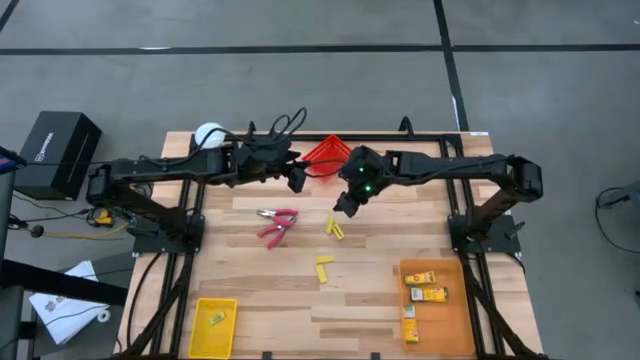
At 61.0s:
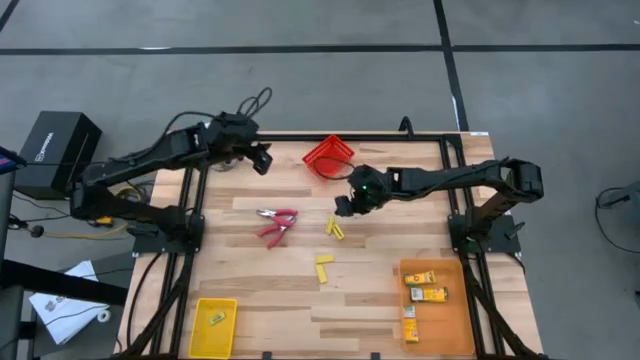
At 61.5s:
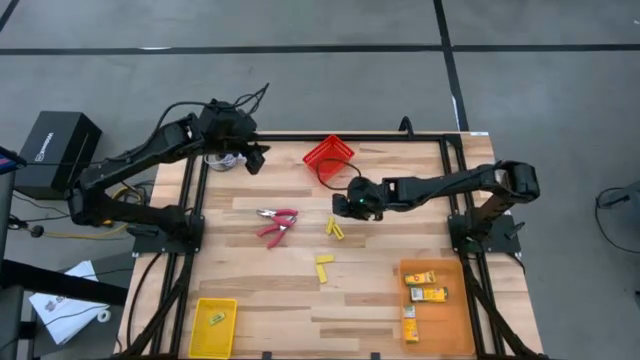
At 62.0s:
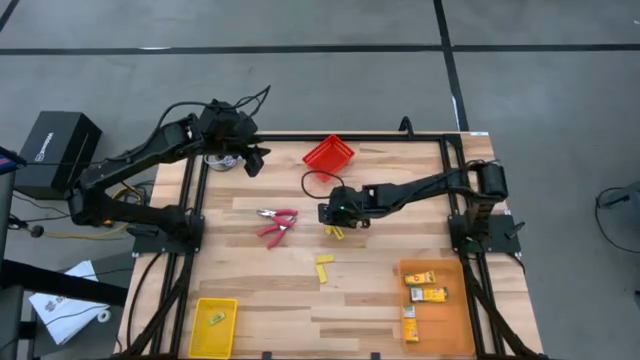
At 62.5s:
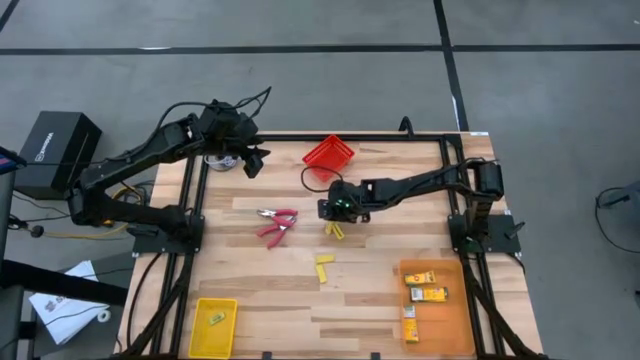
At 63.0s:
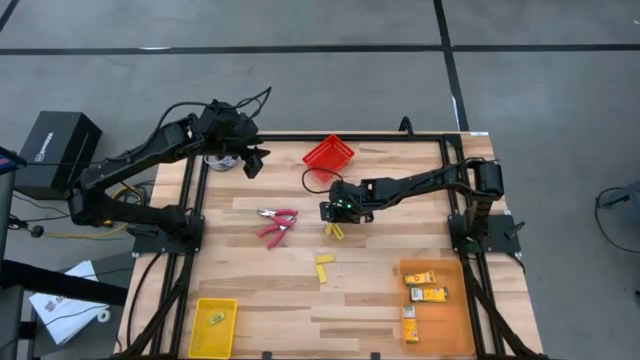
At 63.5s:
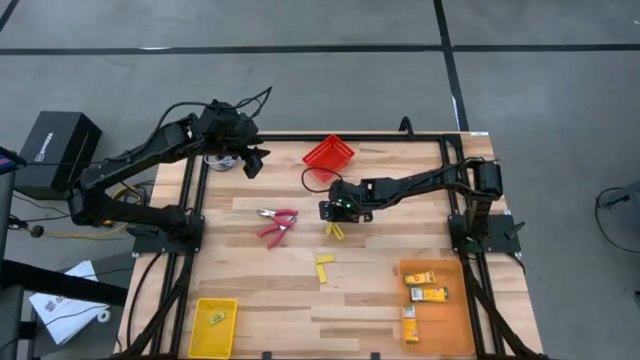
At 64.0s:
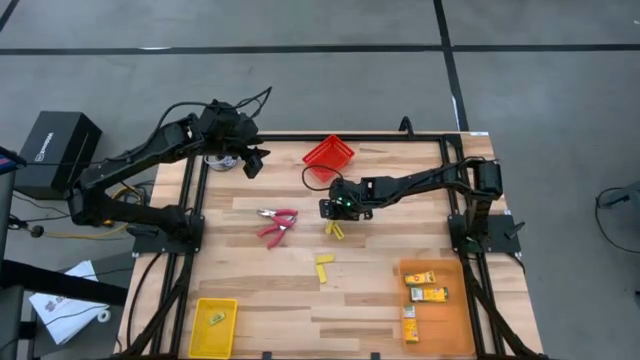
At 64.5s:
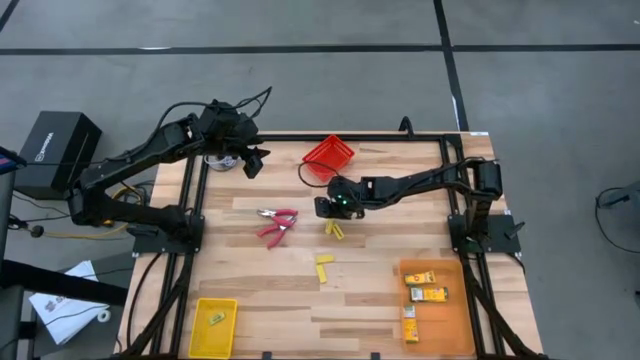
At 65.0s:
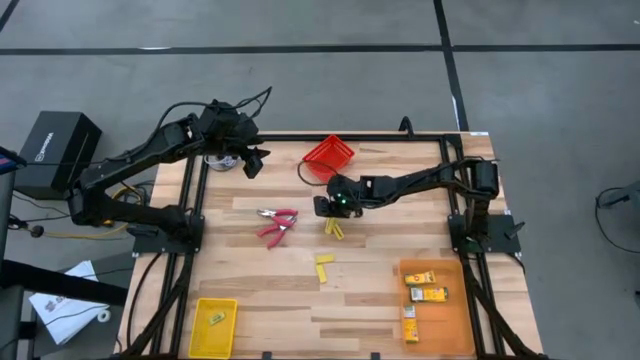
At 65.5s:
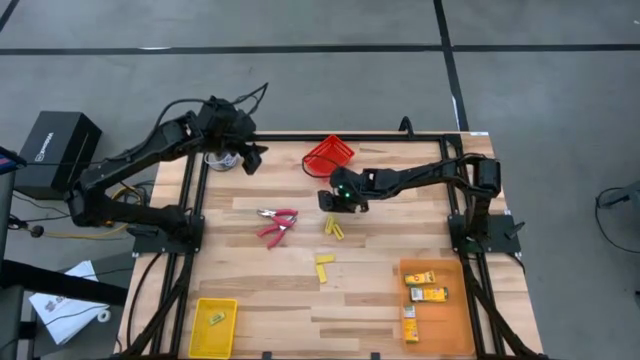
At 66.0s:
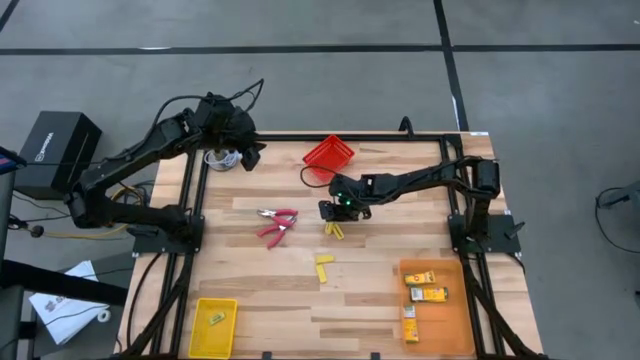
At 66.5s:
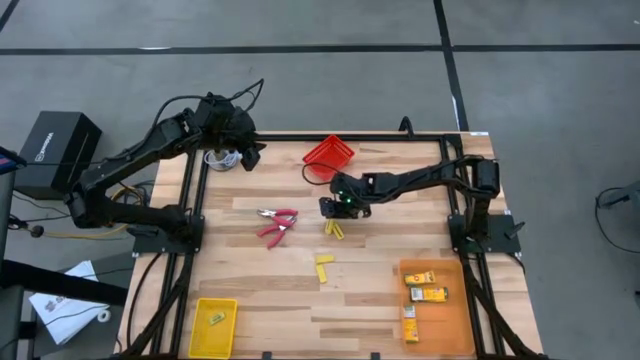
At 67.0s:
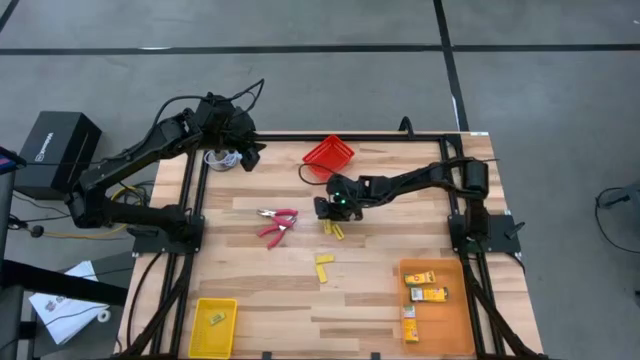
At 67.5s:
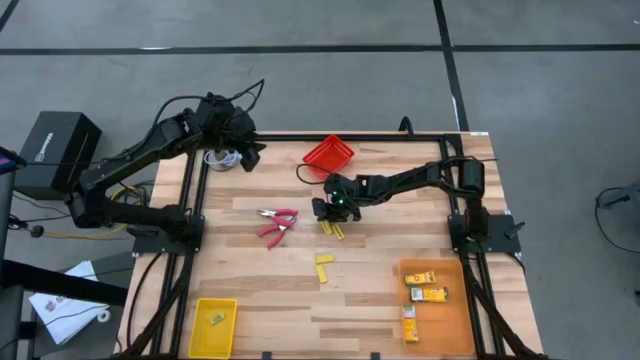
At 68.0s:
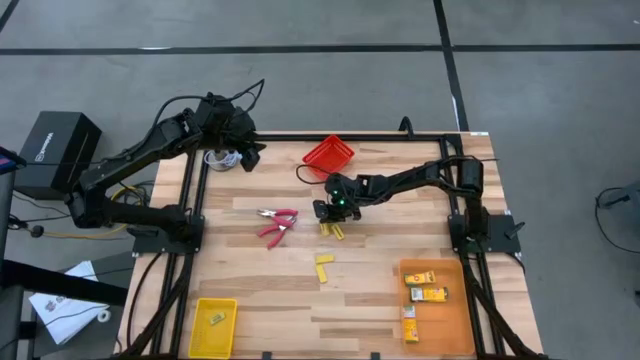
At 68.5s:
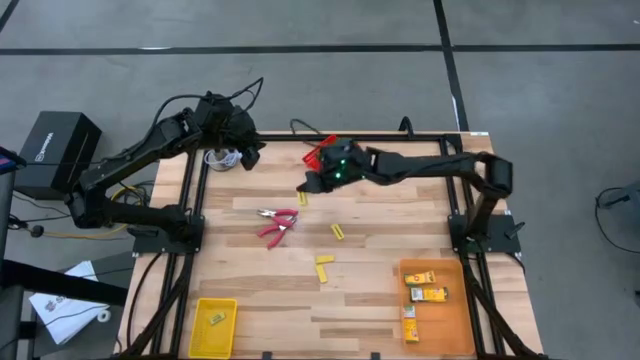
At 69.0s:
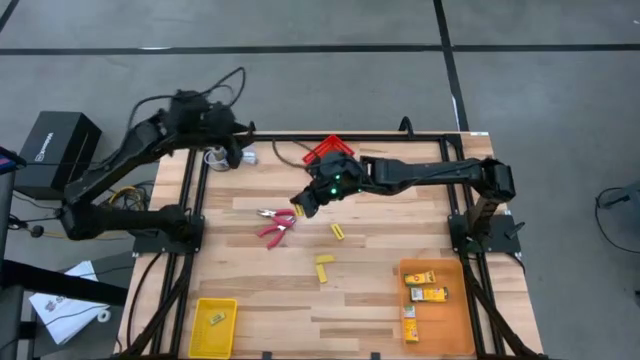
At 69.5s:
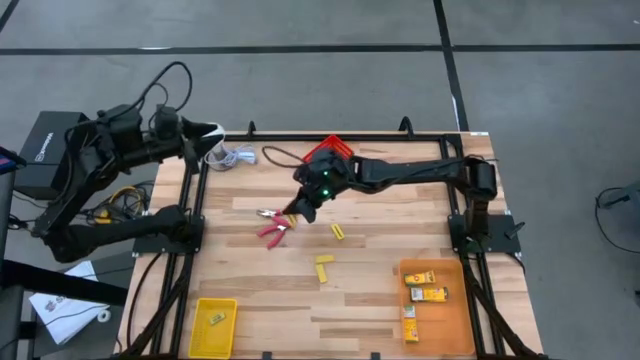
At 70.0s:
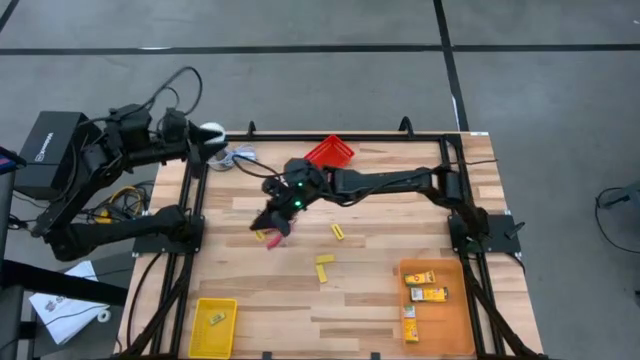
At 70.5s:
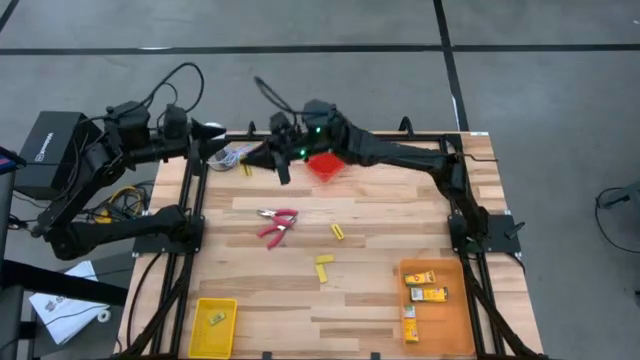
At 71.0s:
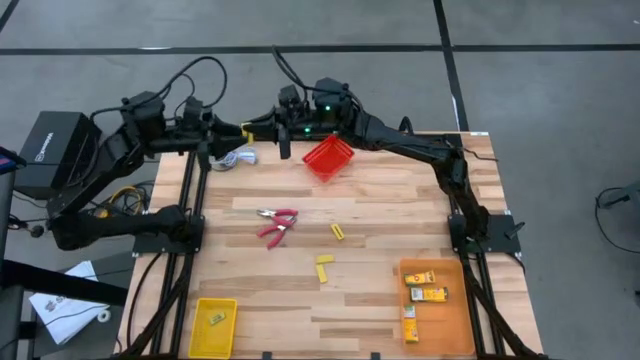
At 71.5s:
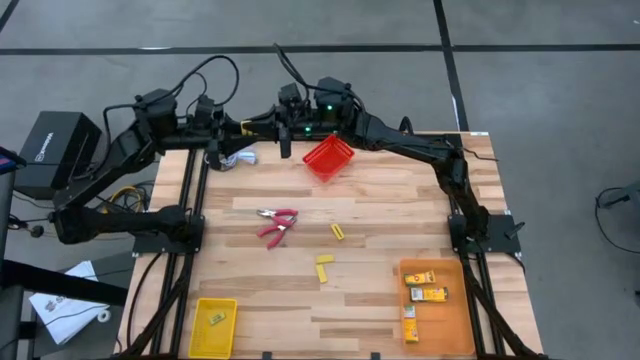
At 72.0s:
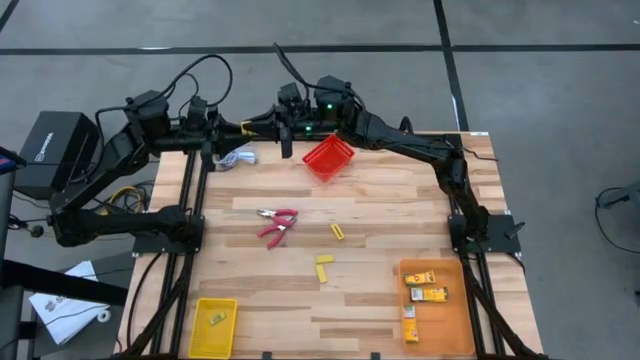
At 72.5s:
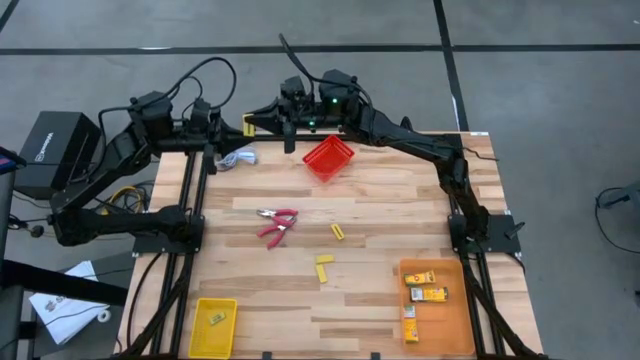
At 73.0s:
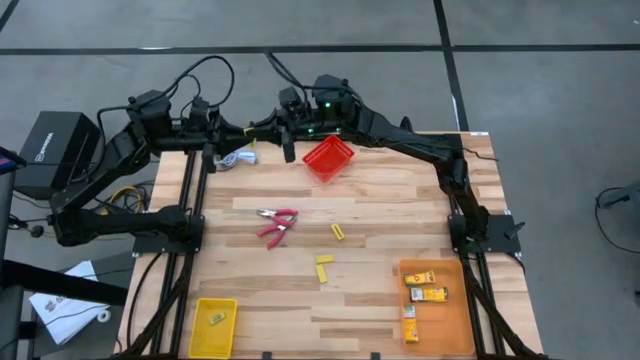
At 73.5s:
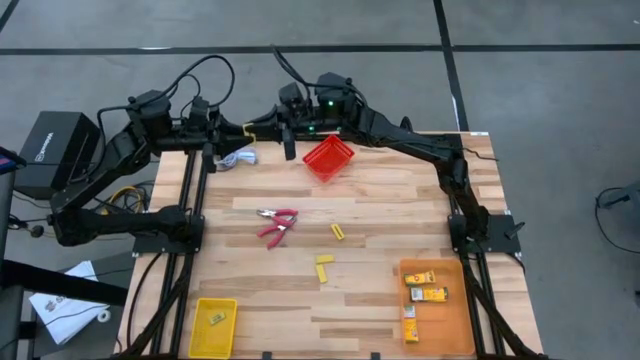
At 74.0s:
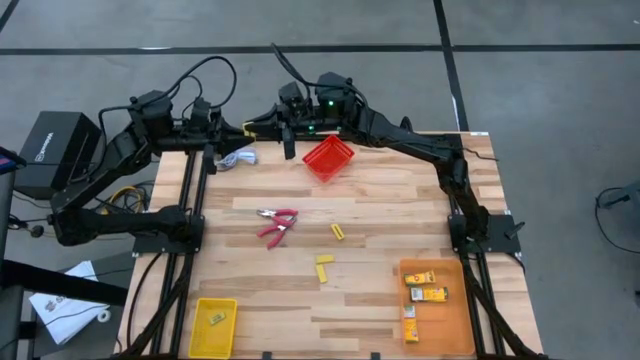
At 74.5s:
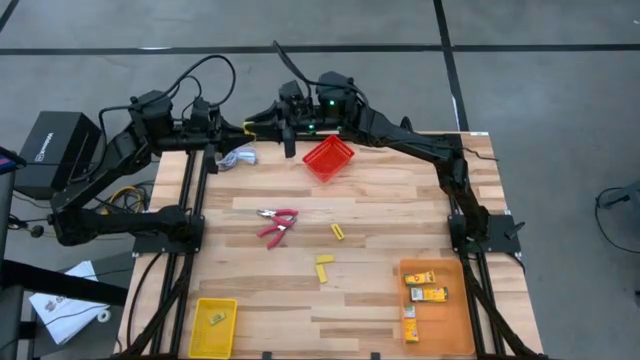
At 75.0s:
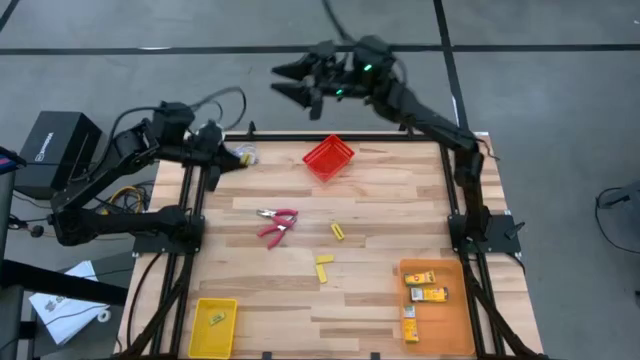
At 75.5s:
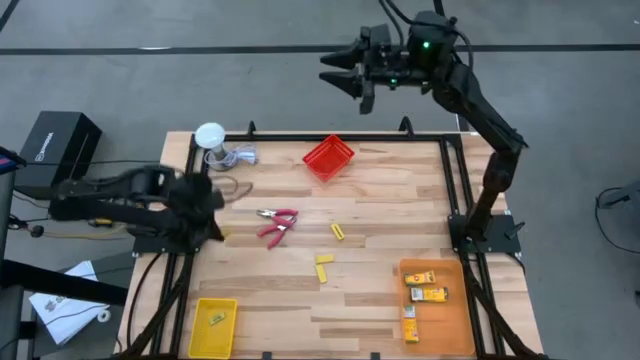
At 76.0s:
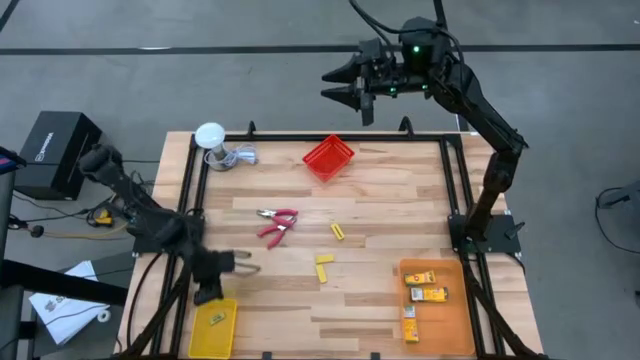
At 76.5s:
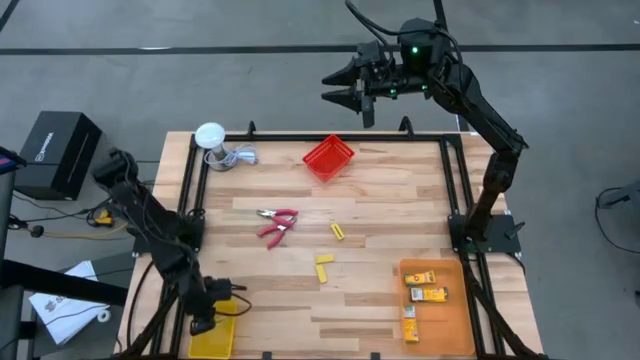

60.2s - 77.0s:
Task: Pick & Place School Supplies
Put the yellow eraser into the yellow bin

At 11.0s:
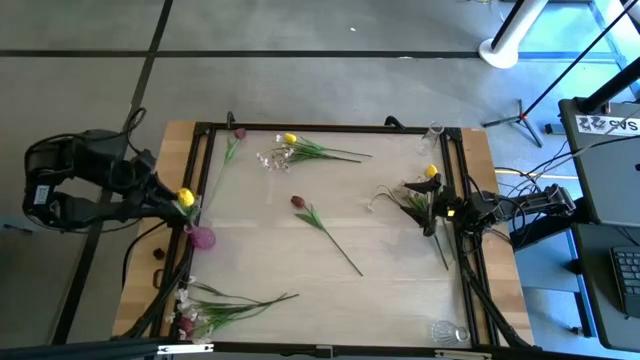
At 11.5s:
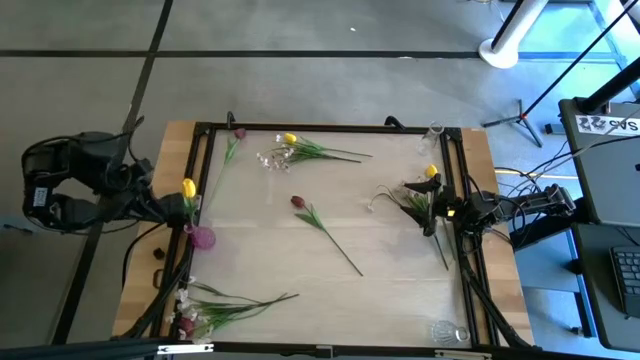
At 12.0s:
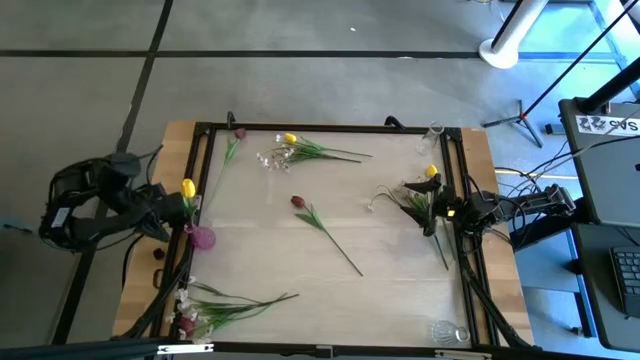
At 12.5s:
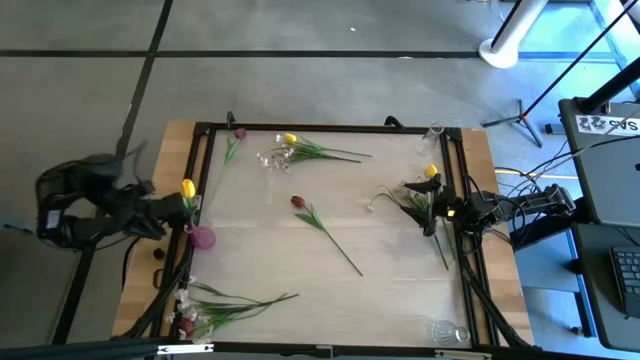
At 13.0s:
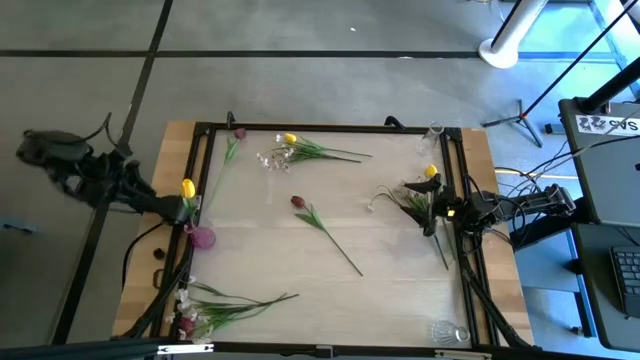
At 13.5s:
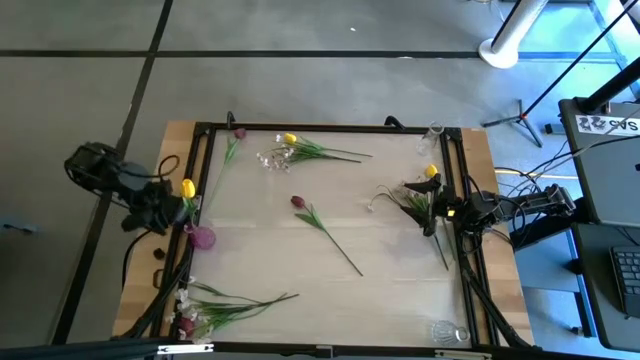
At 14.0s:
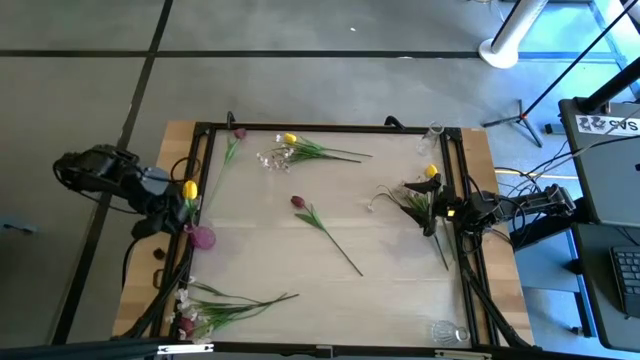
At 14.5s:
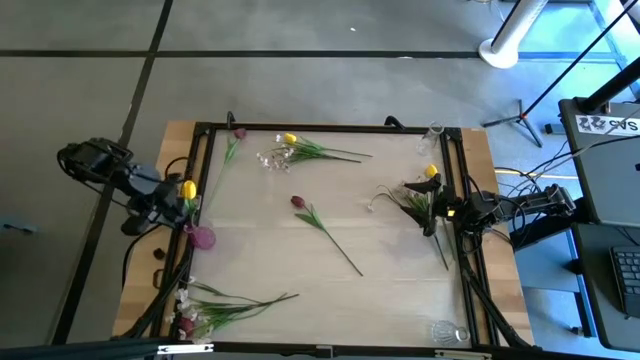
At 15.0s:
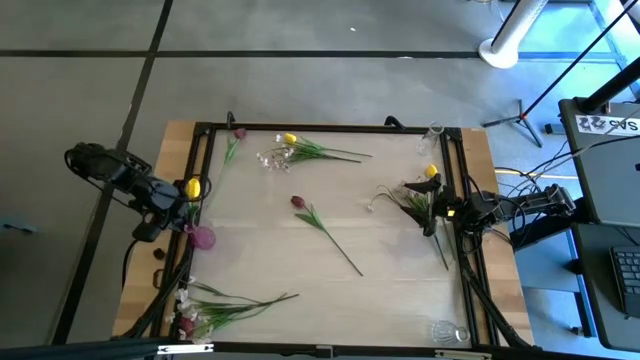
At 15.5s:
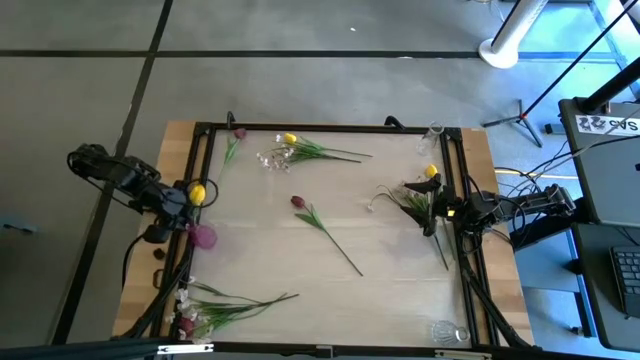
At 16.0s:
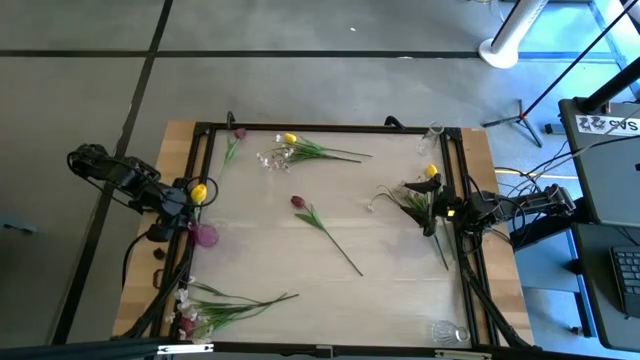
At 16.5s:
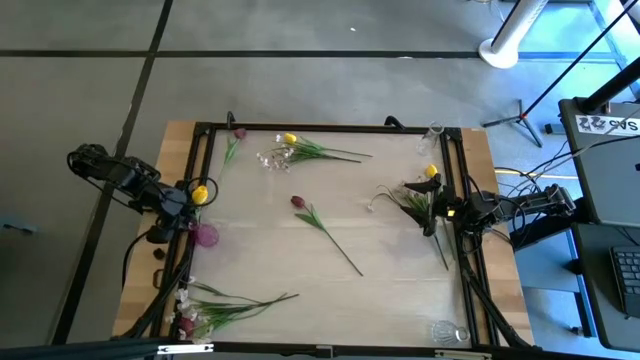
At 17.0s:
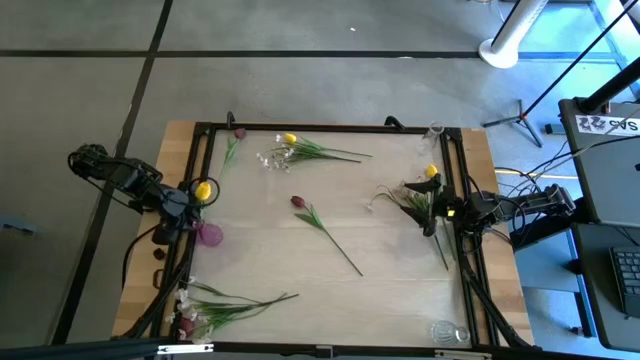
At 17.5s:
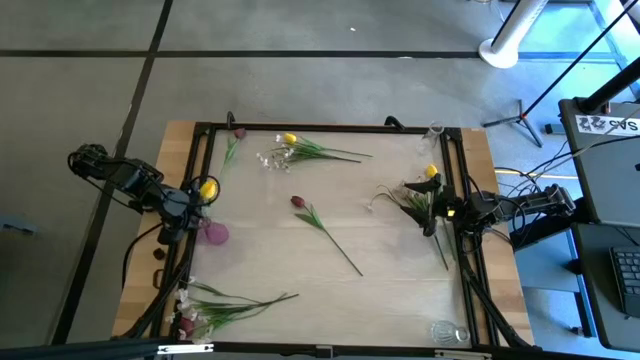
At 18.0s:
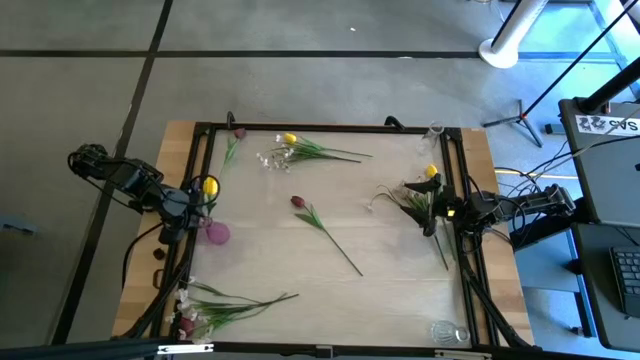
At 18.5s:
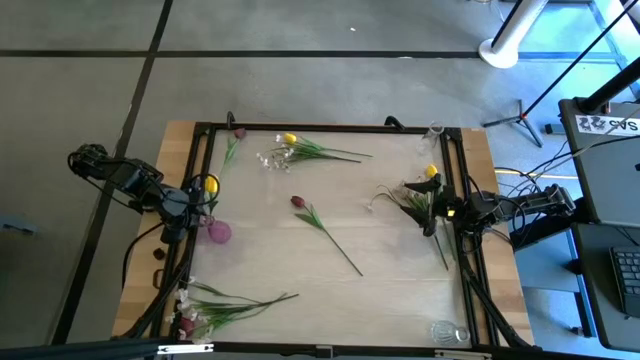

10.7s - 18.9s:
Task: Sort flowers into vase by color
Adjust the purple flower vase
